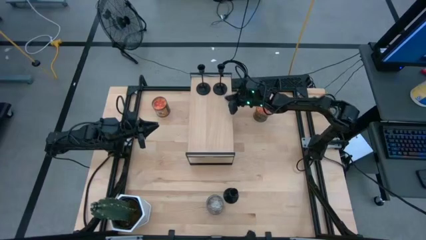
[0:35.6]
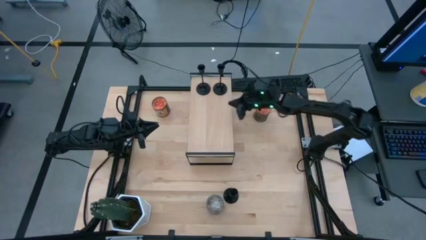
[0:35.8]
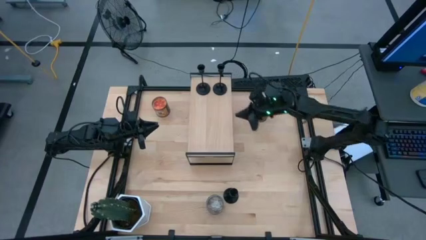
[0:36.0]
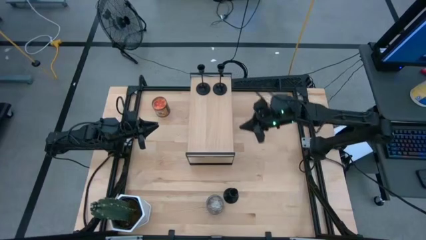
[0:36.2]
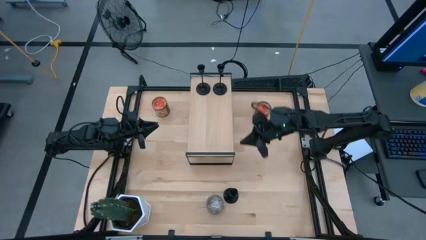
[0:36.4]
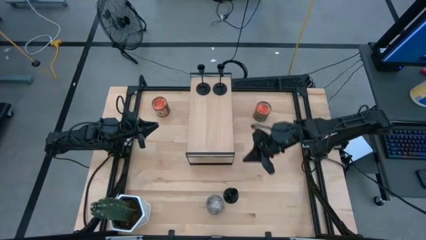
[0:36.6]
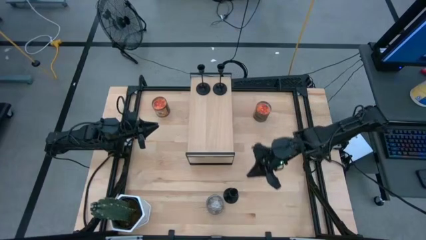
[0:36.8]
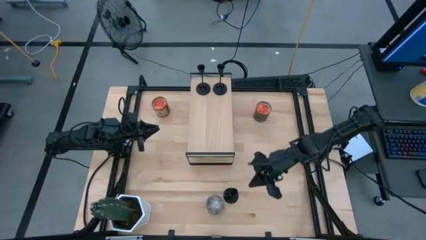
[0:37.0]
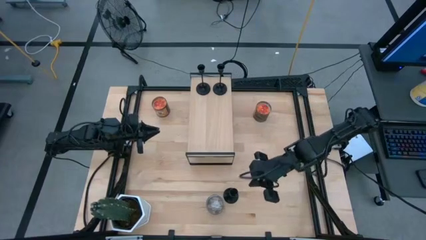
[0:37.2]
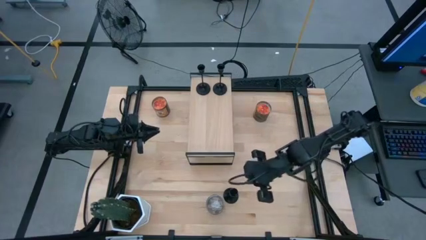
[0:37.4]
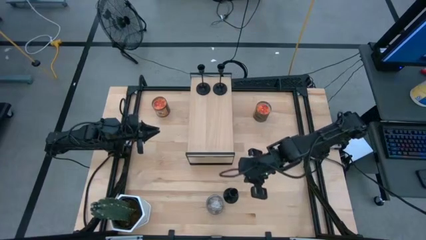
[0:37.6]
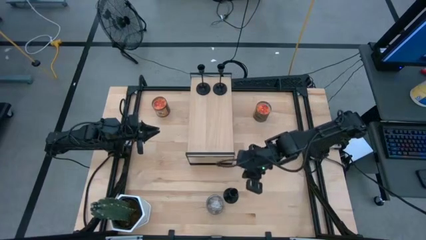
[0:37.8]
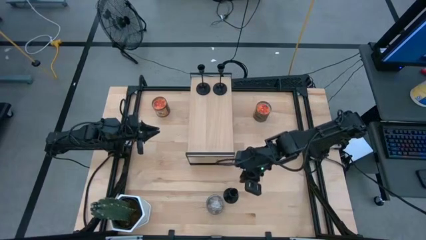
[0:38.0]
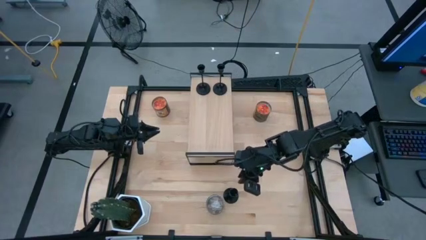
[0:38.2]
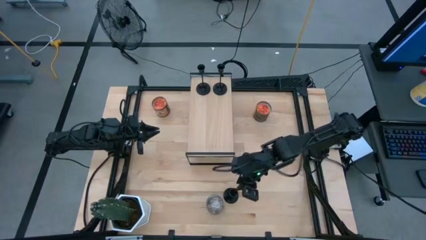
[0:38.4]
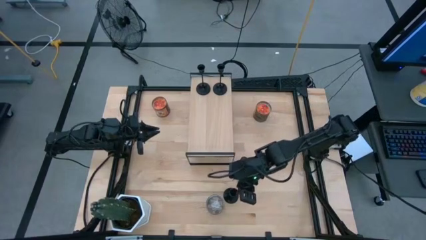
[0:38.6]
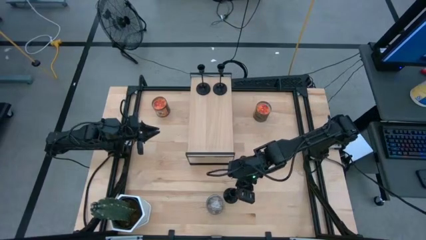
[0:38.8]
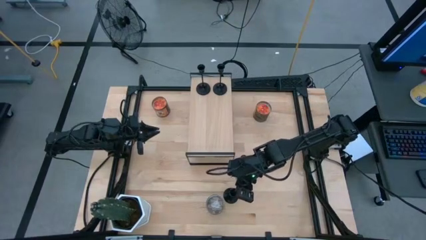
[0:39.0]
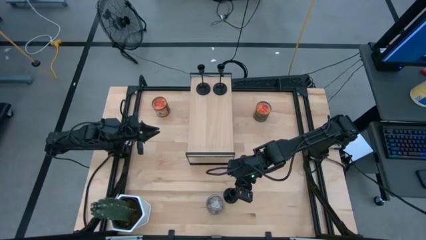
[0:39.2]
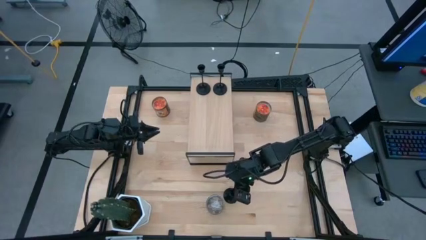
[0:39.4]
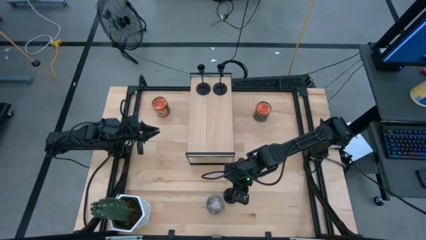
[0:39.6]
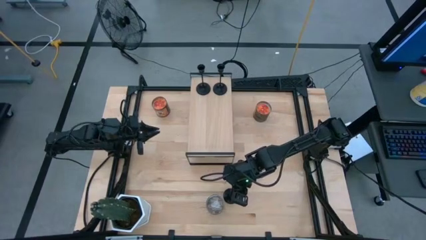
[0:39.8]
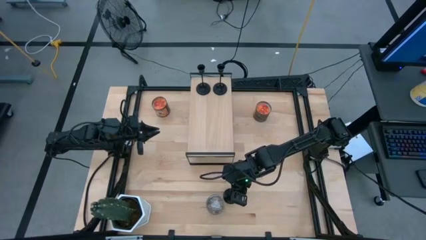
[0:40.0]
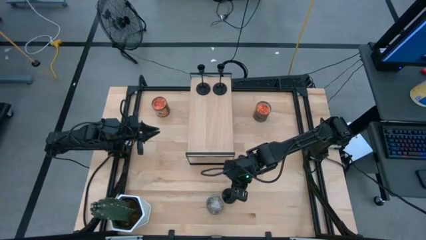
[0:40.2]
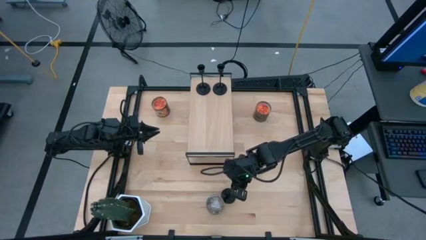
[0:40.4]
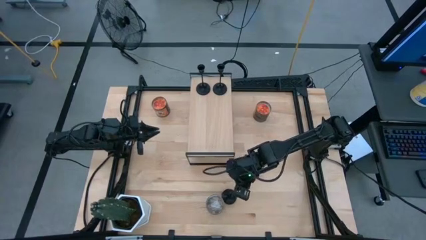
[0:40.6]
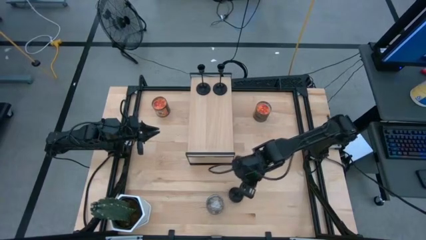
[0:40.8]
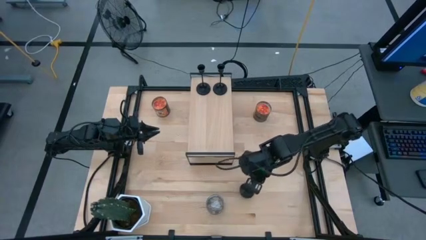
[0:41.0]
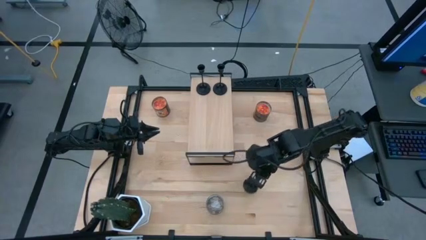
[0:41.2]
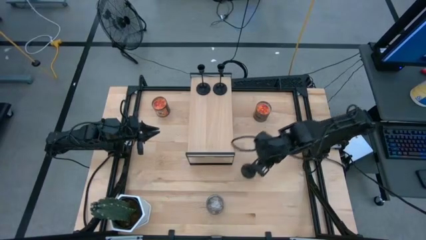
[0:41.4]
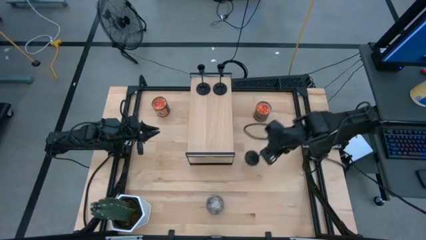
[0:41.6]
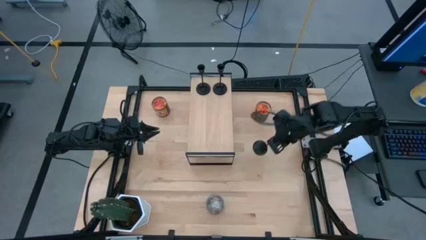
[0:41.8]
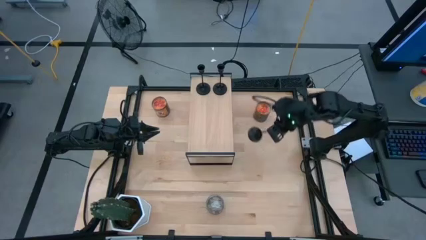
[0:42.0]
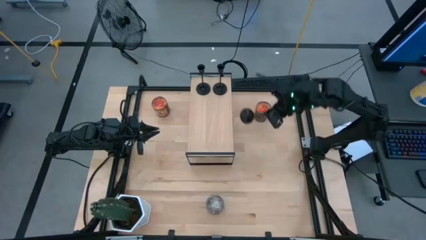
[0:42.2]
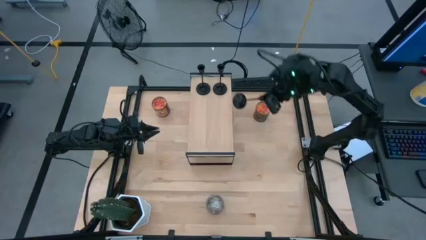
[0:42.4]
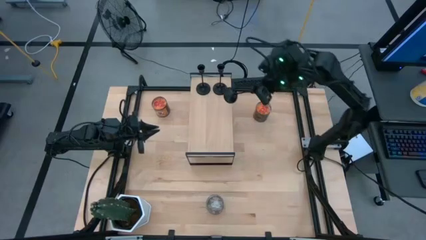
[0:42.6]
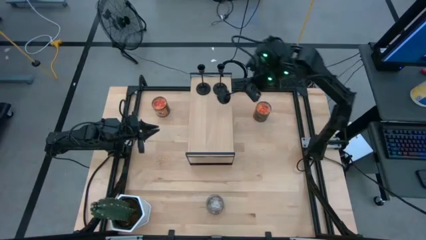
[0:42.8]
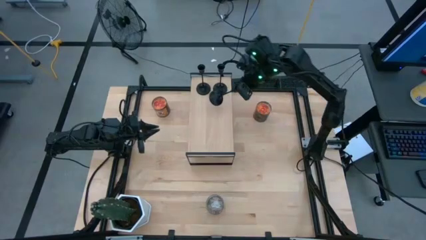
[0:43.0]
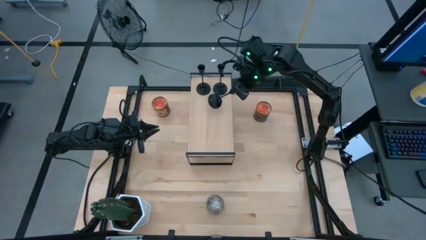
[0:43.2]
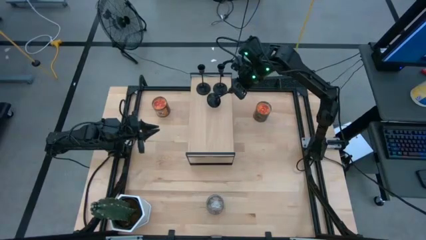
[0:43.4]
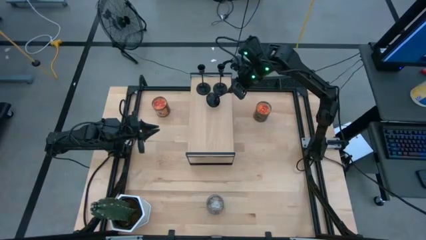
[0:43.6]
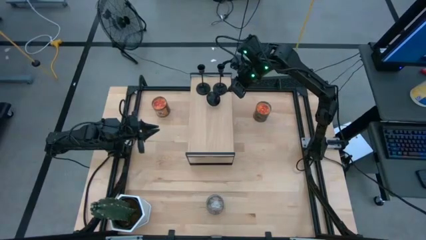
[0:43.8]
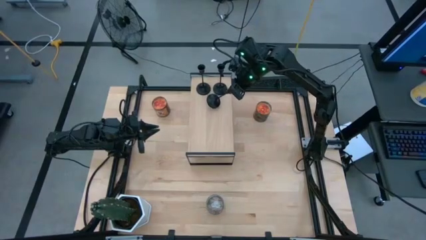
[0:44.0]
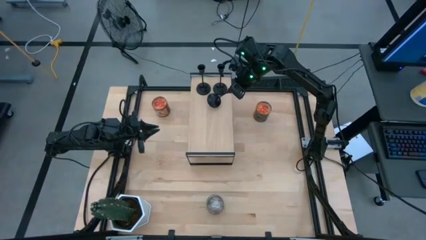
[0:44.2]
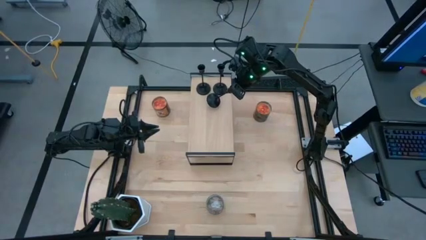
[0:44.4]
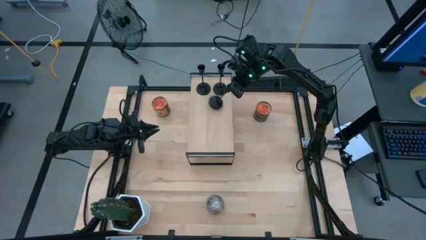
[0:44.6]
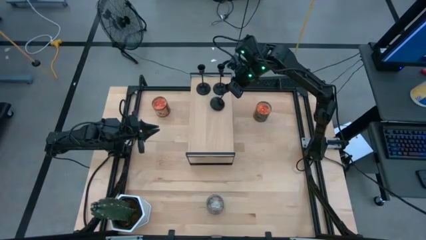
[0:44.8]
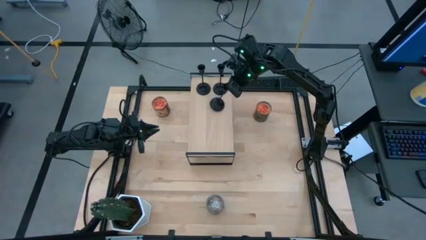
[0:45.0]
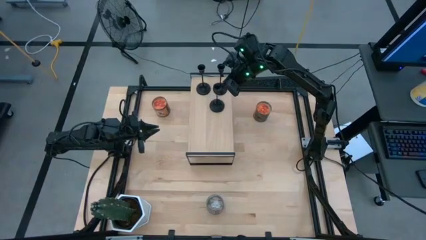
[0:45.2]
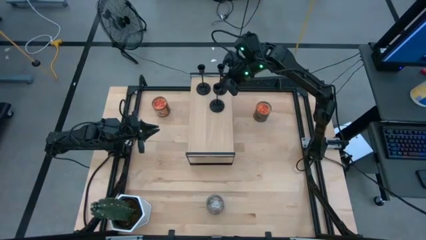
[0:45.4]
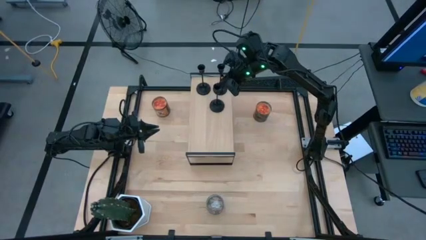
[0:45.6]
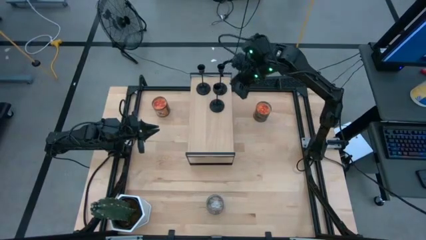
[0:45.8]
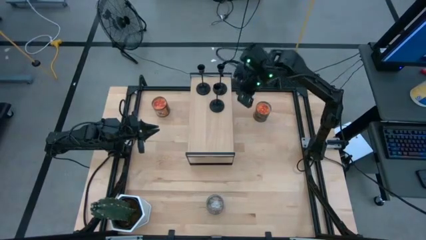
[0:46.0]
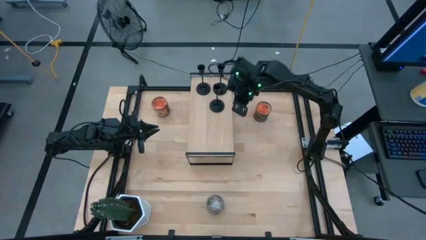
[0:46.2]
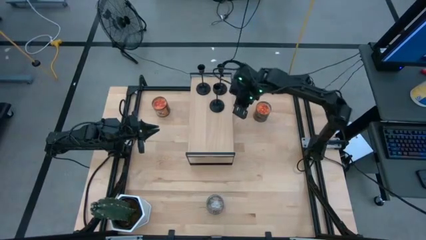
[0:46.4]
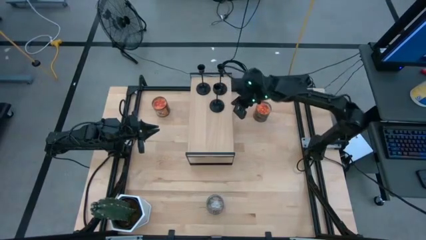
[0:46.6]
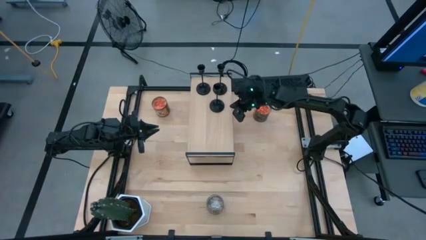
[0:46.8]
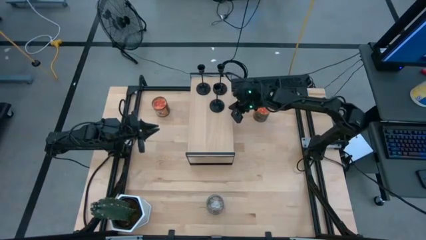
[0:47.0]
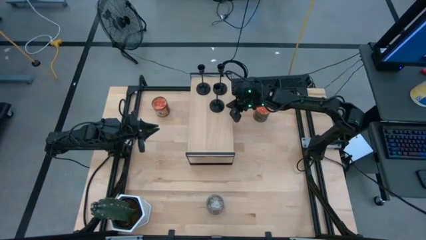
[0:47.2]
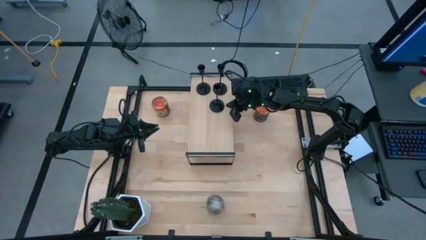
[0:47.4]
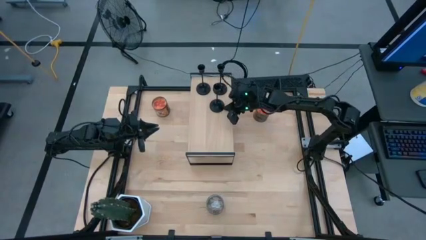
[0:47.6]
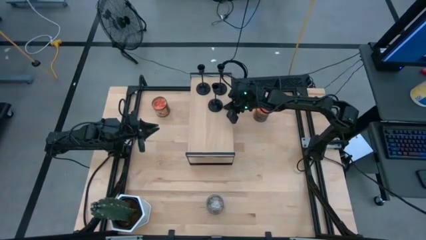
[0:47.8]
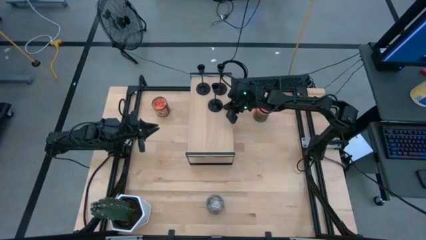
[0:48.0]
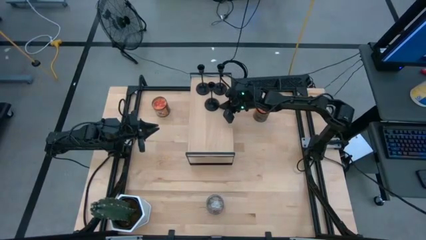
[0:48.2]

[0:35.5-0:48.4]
Task: Pick & Place candle stick holders
Put the black candle holder on the shelf
